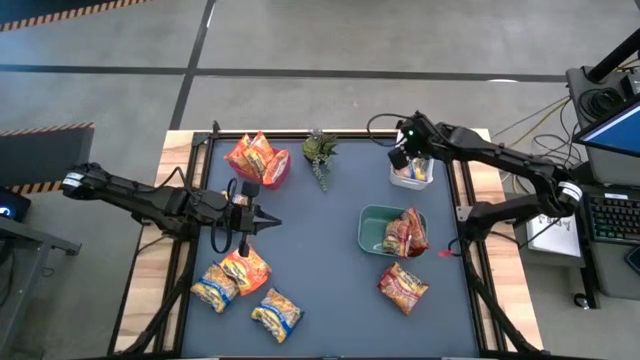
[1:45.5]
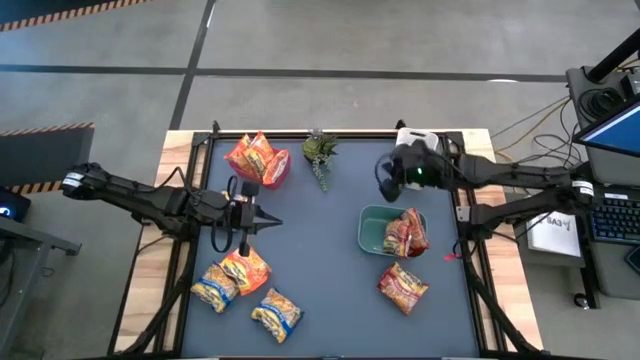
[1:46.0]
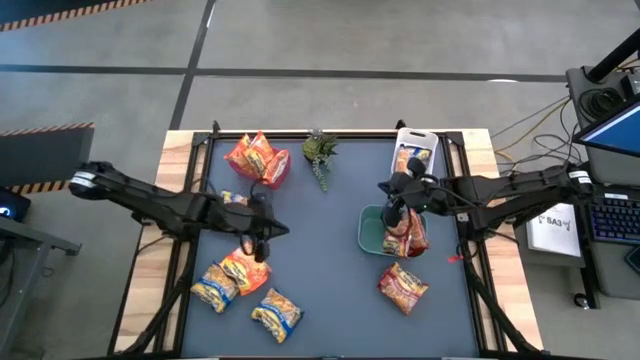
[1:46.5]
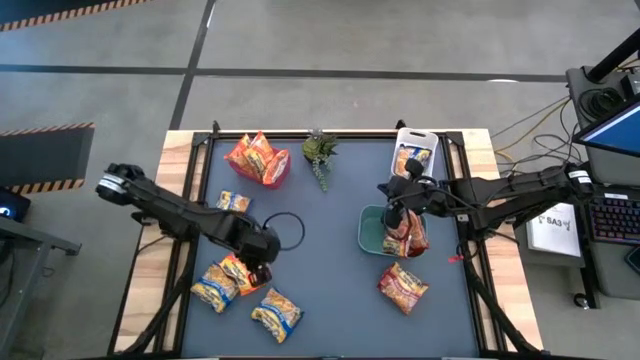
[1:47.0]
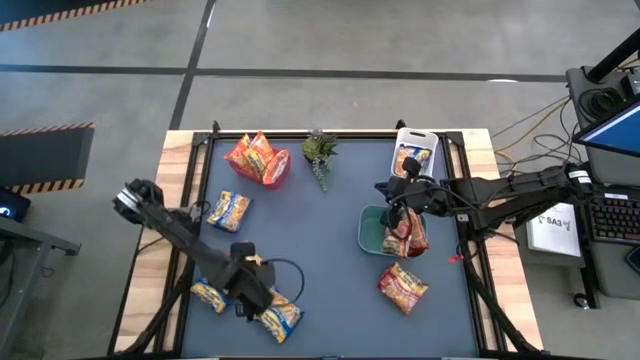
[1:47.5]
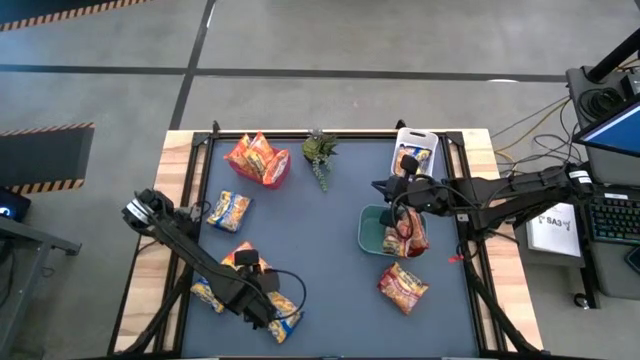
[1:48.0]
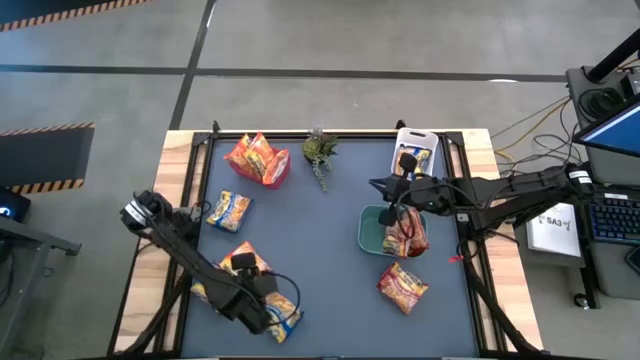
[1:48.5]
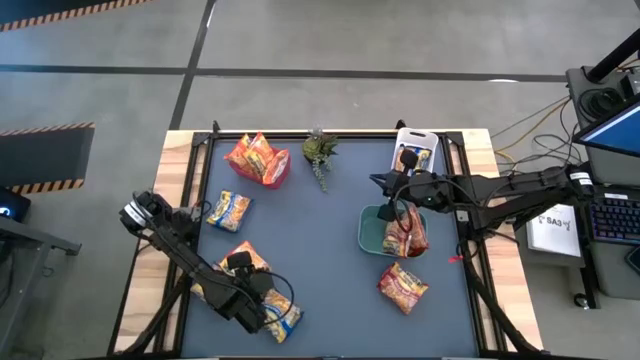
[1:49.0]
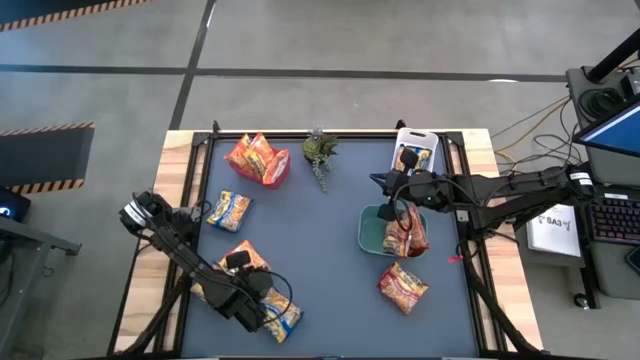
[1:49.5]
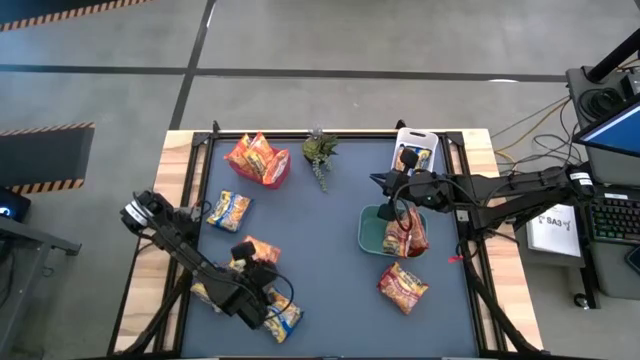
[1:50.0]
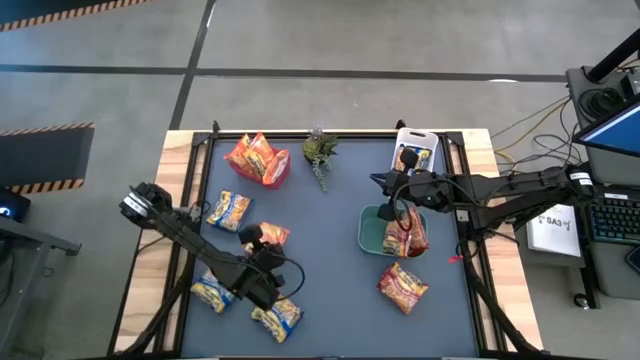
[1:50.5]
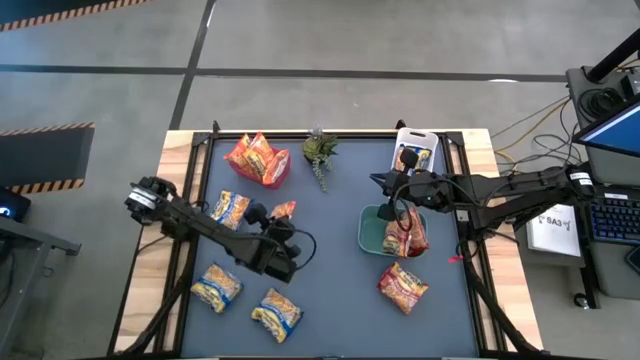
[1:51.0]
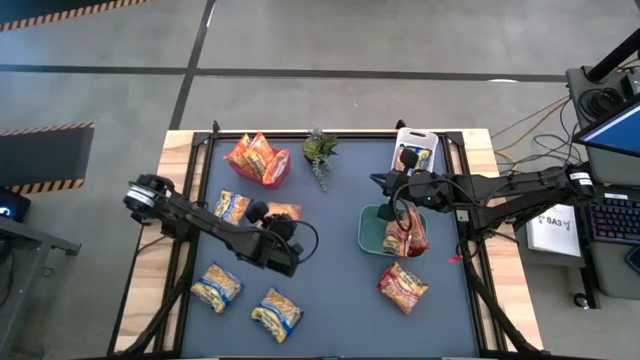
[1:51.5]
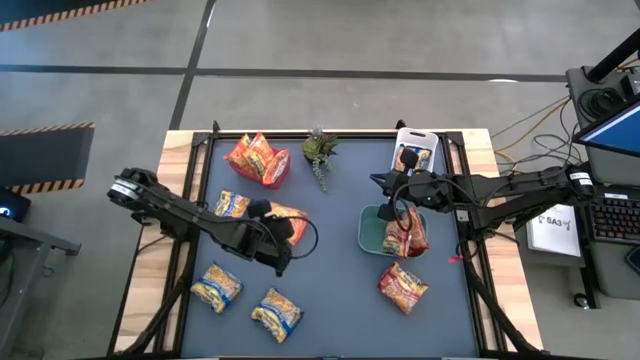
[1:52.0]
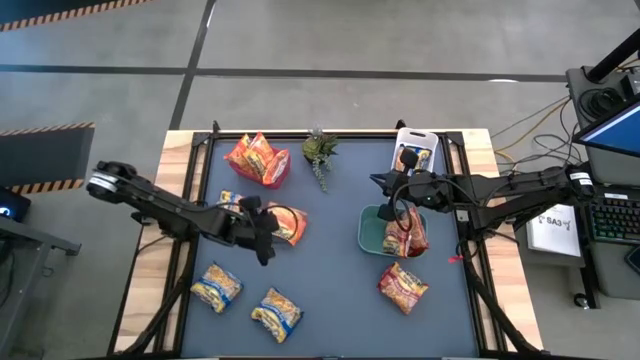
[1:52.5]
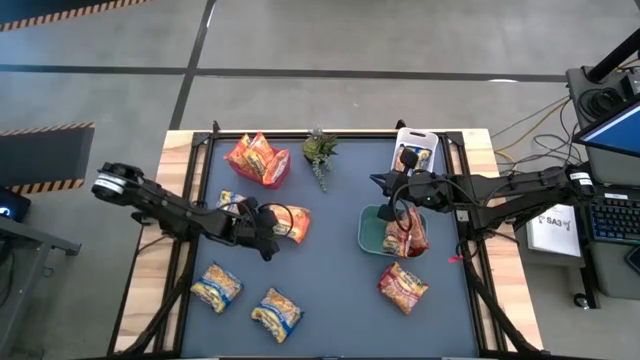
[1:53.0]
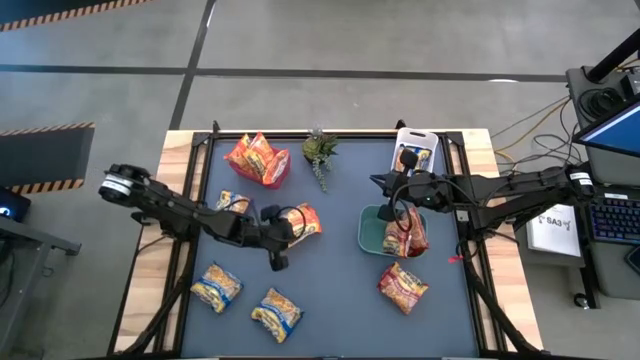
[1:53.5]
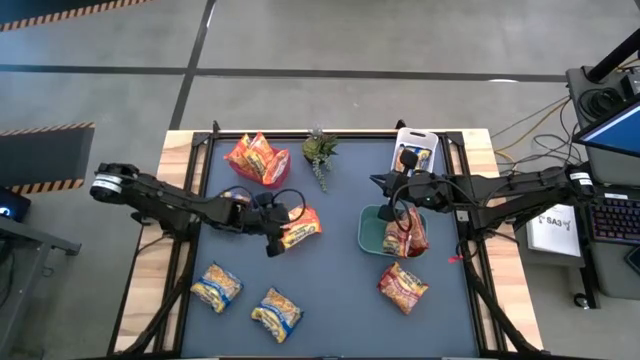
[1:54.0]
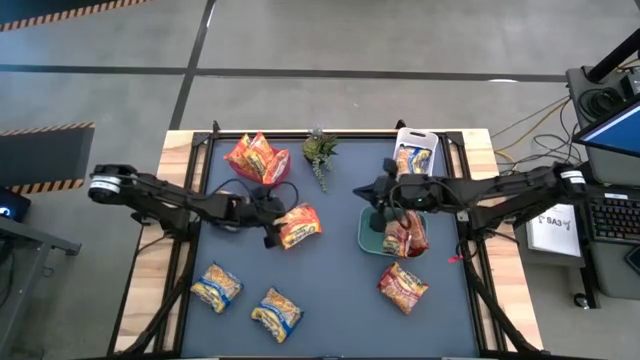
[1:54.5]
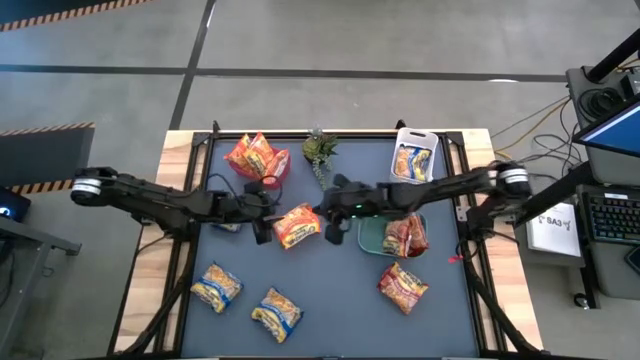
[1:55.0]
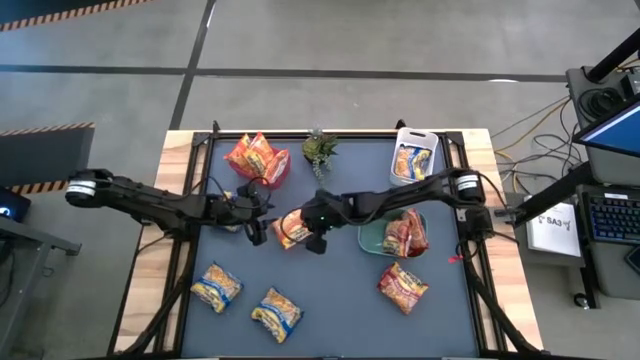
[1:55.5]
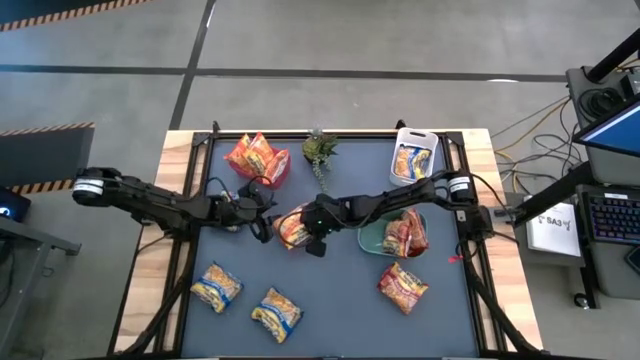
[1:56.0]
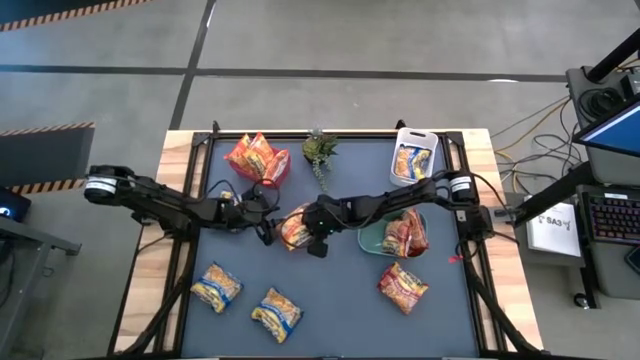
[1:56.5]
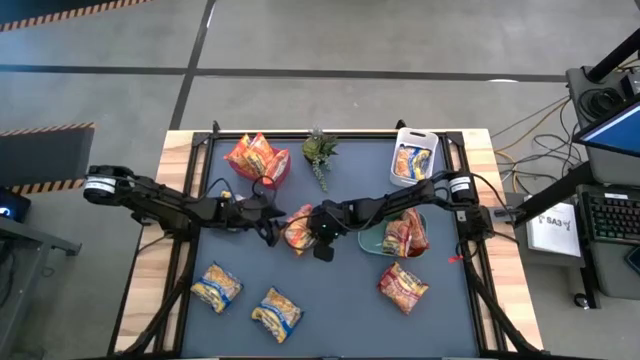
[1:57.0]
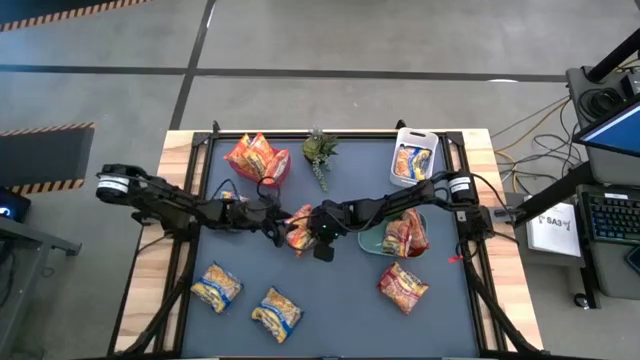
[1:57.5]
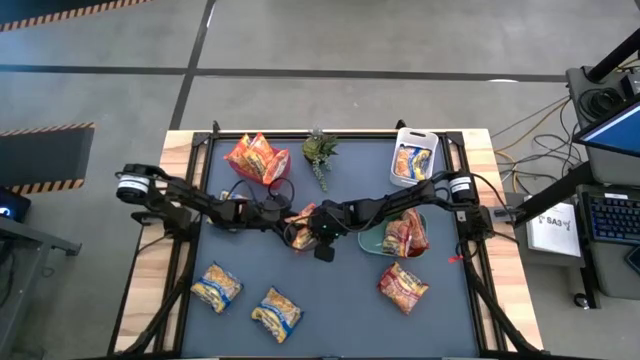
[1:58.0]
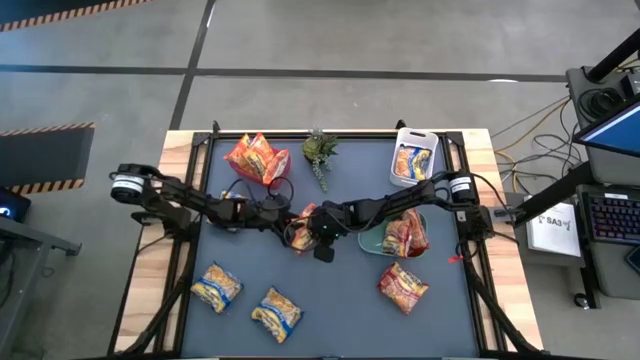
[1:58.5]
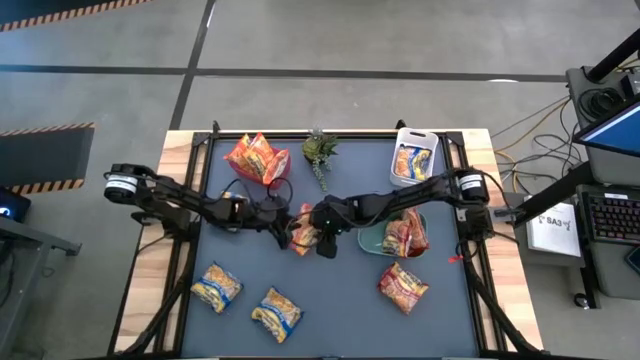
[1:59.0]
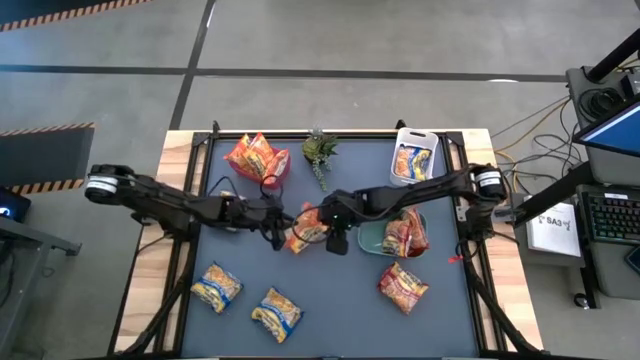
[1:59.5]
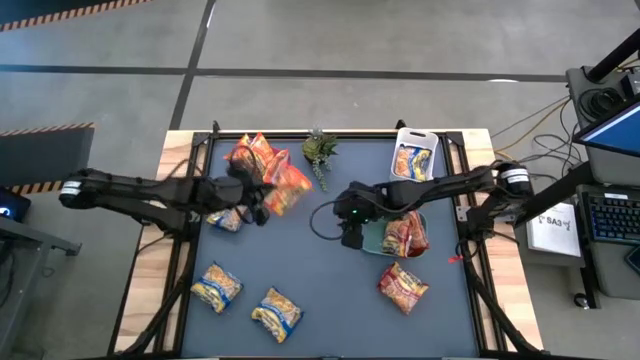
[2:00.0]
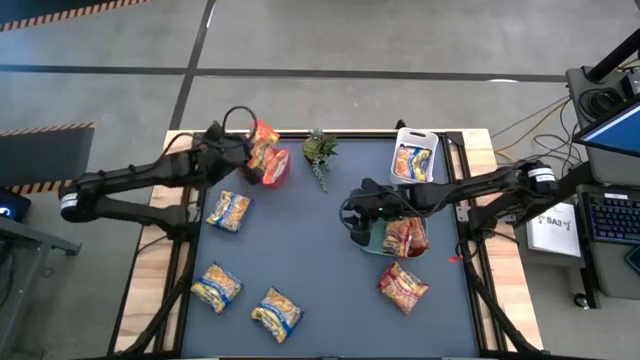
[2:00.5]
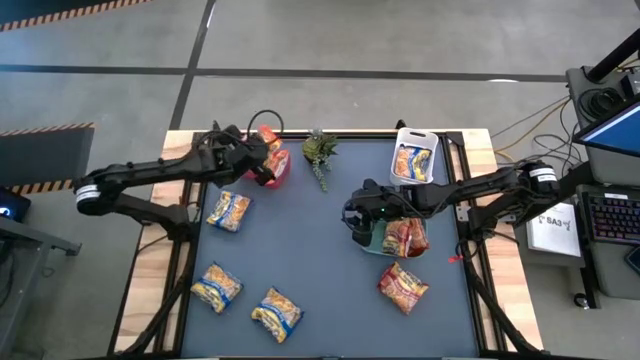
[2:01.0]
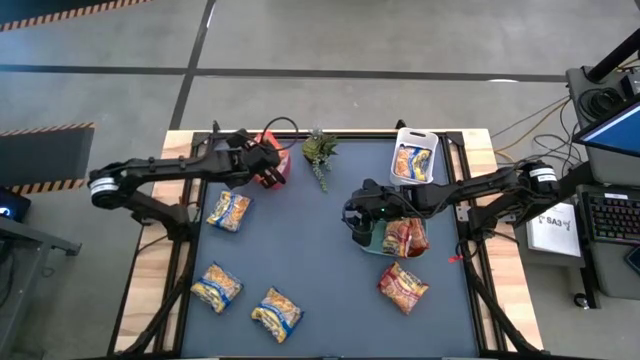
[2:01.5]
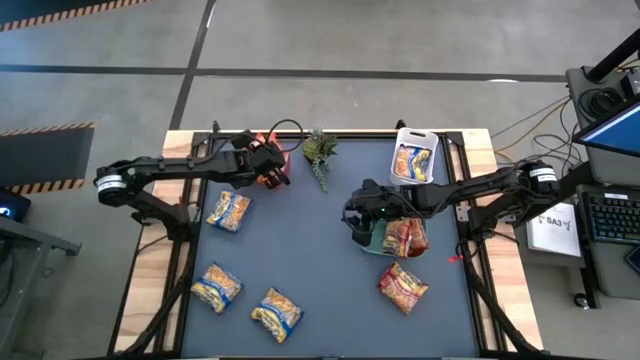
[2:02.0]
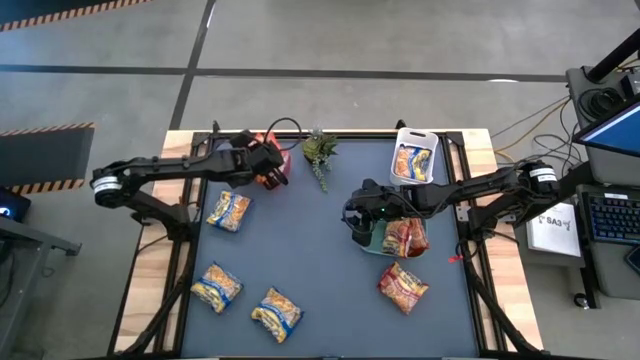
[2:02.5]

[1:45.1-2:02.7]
Task: Sort Maruchan noodles
Put the orange noodle pack into the red bin

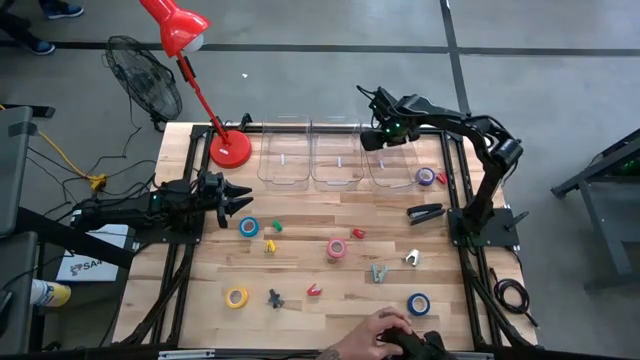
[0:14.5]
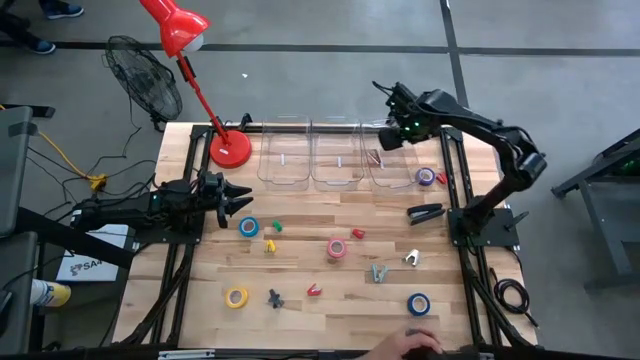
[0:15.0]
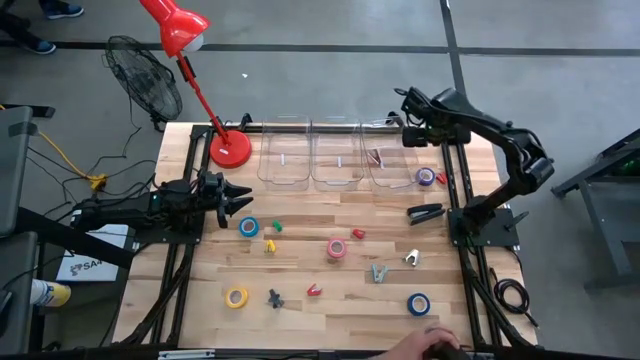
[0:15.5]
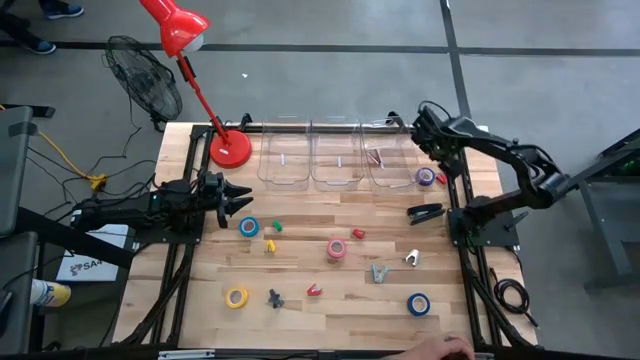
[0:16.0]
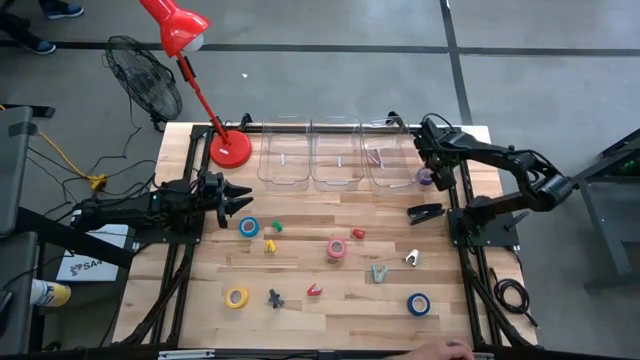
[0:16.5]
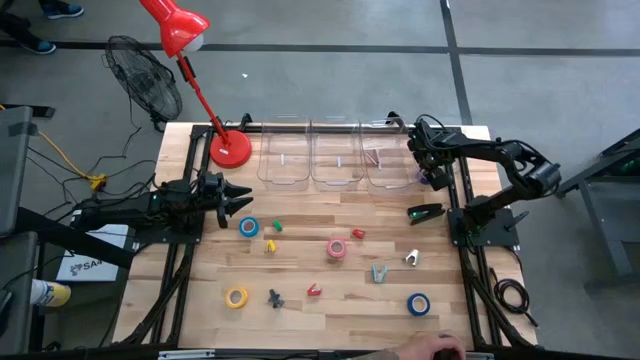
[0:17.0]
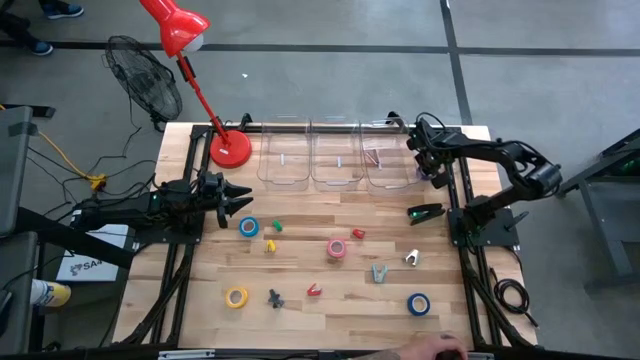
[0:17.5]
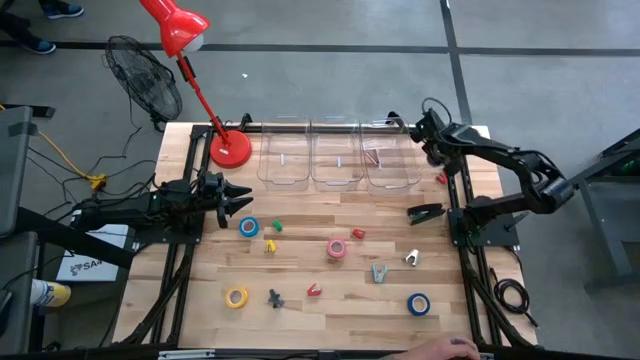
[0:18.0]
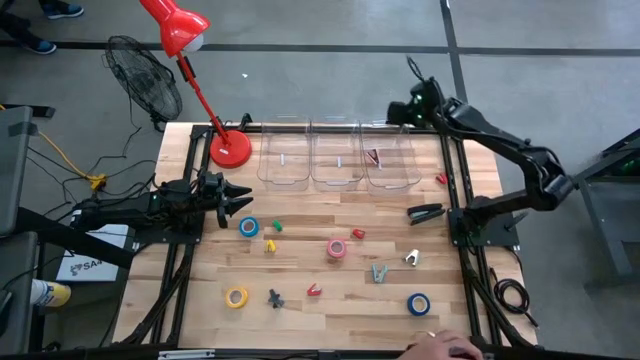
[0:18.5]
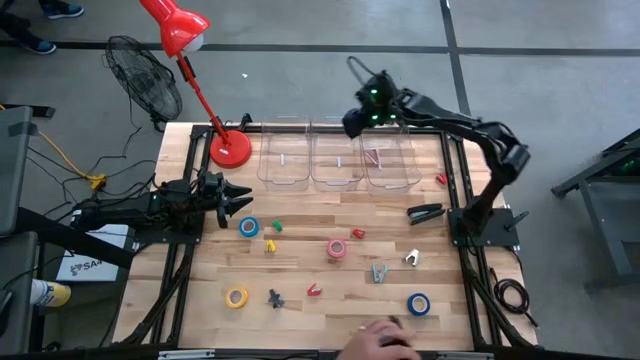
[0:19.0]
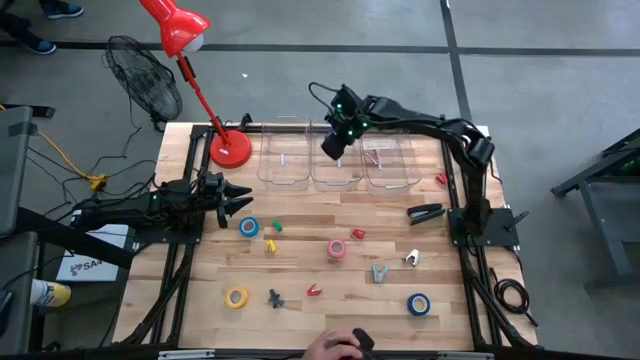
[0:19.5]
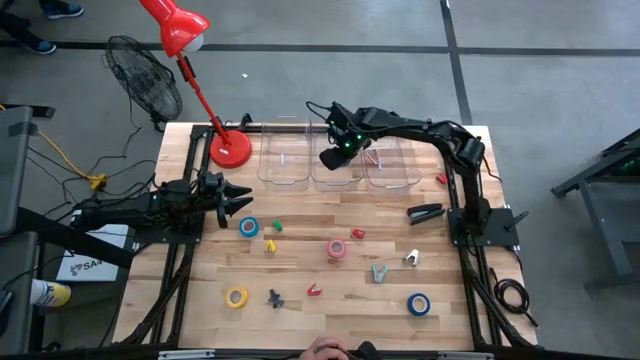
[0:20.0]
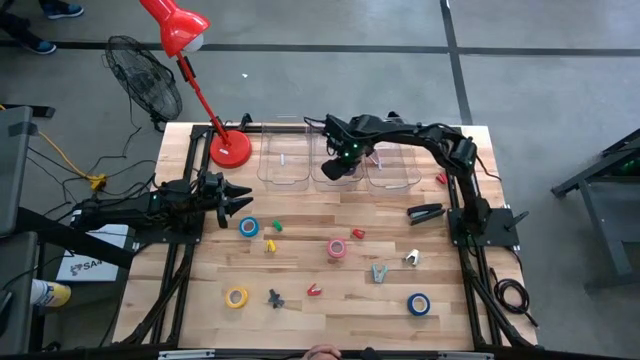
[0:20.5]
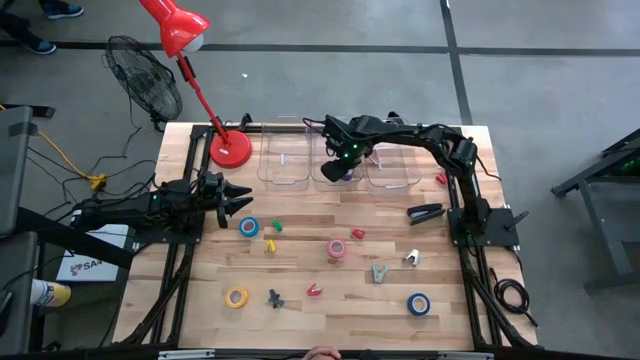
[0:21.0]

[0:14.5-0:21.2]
Task: Pick and place Stapler, Stapler remover, tape
Put the top blue tape into the middle transparent bin
